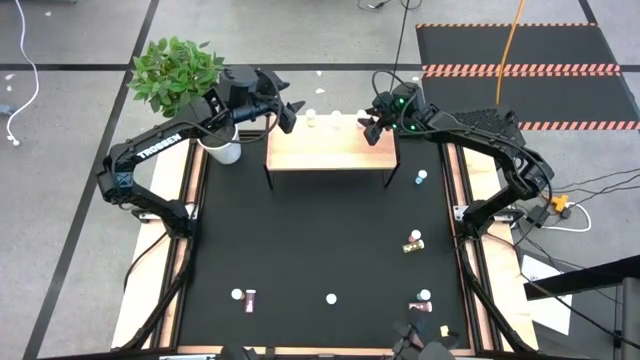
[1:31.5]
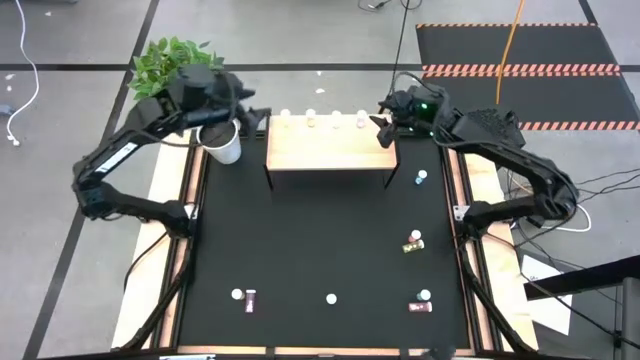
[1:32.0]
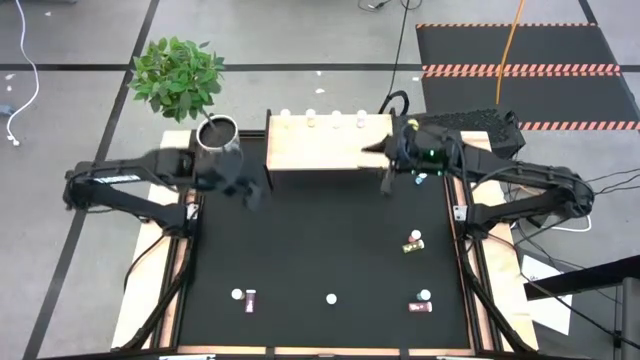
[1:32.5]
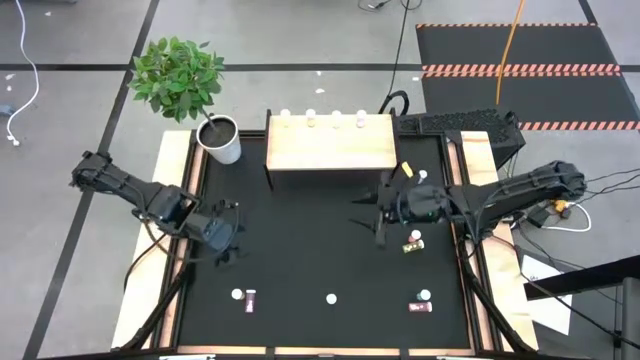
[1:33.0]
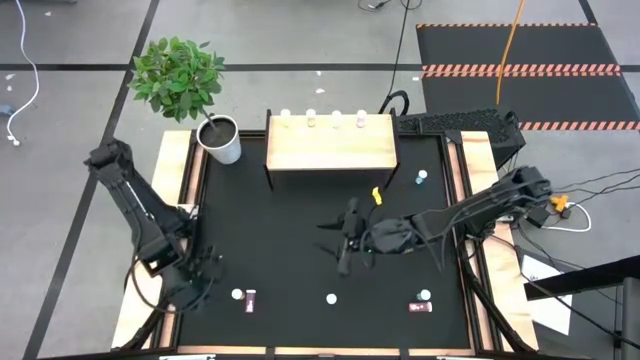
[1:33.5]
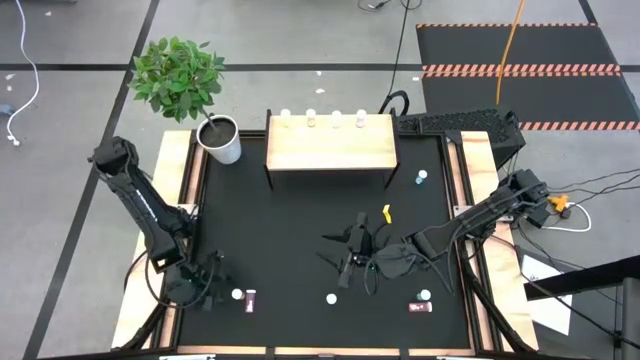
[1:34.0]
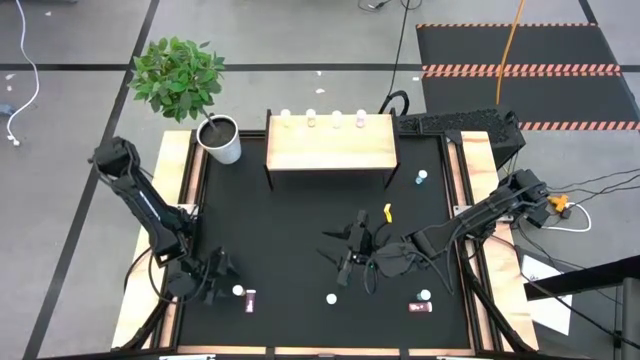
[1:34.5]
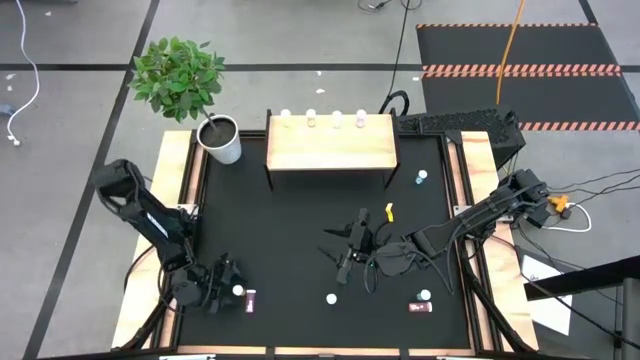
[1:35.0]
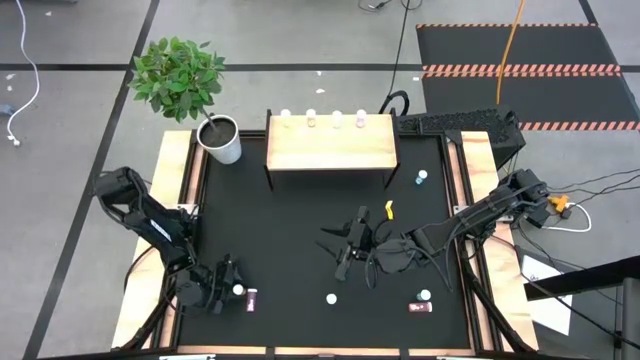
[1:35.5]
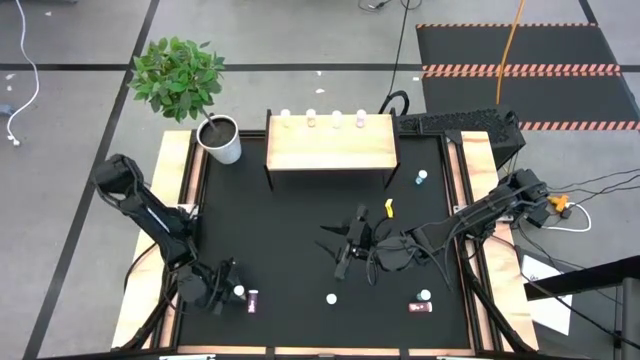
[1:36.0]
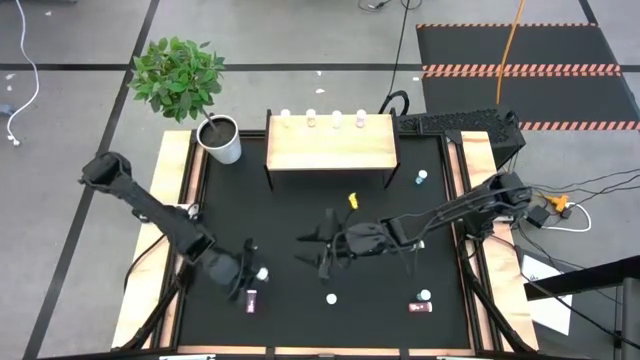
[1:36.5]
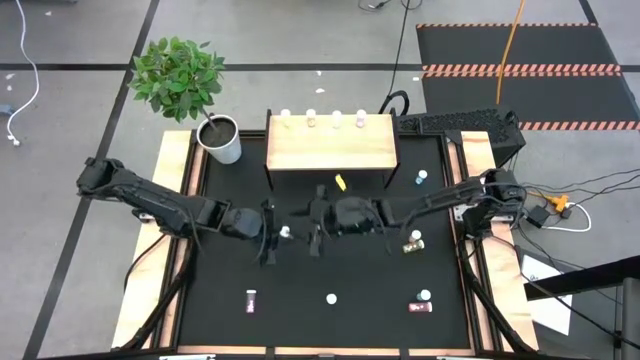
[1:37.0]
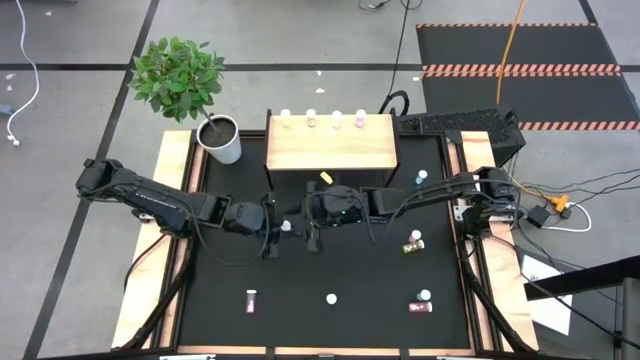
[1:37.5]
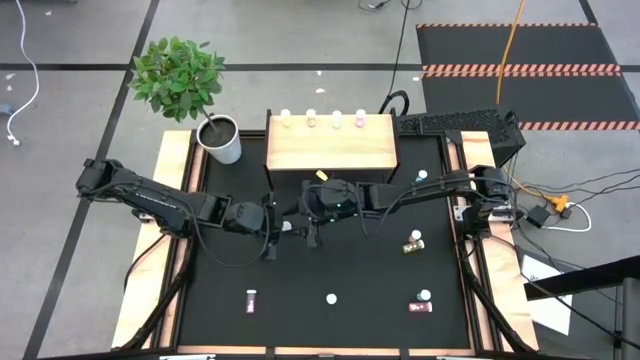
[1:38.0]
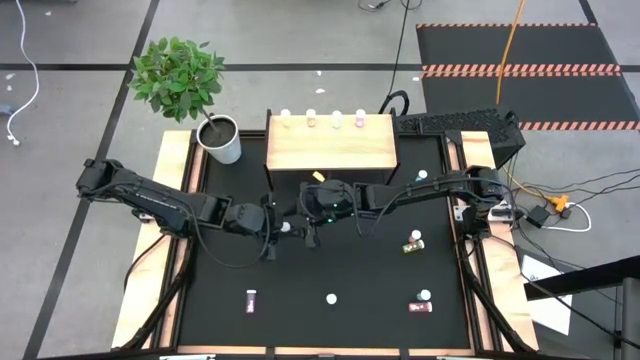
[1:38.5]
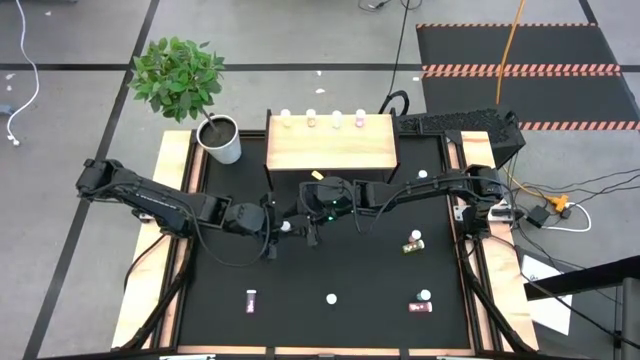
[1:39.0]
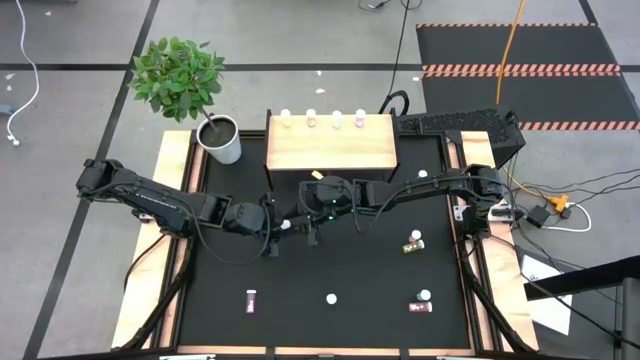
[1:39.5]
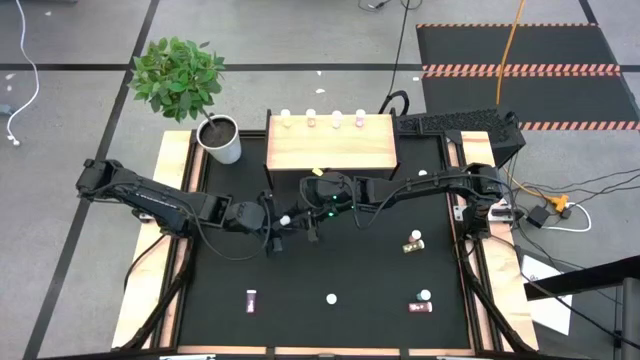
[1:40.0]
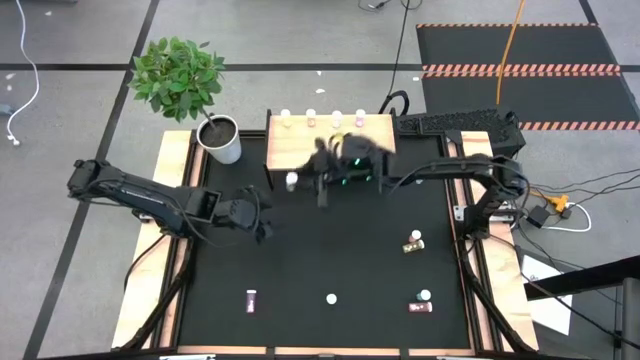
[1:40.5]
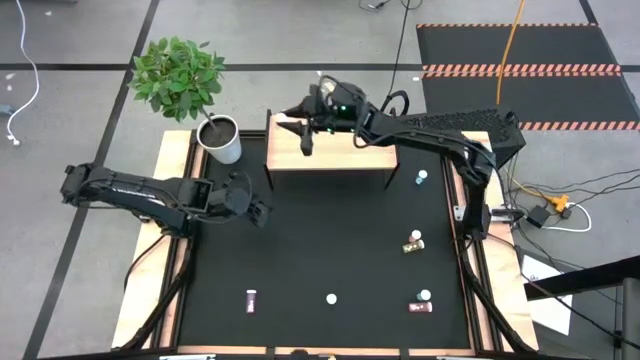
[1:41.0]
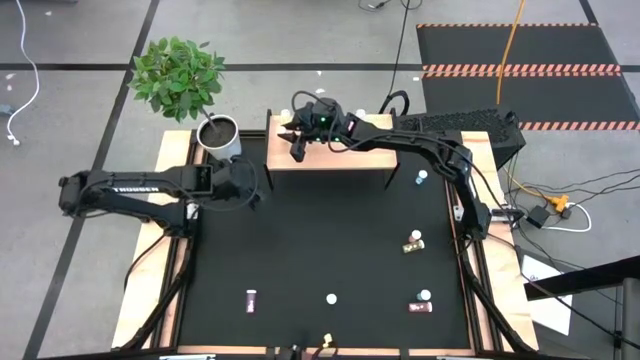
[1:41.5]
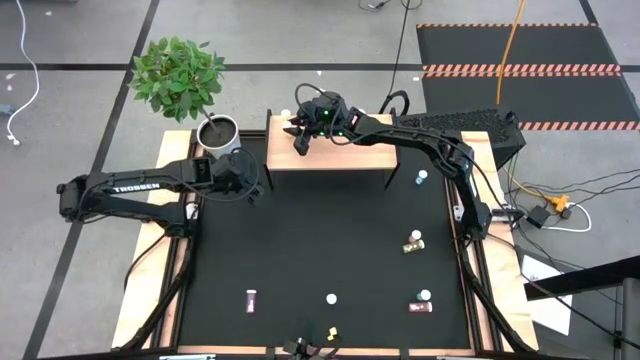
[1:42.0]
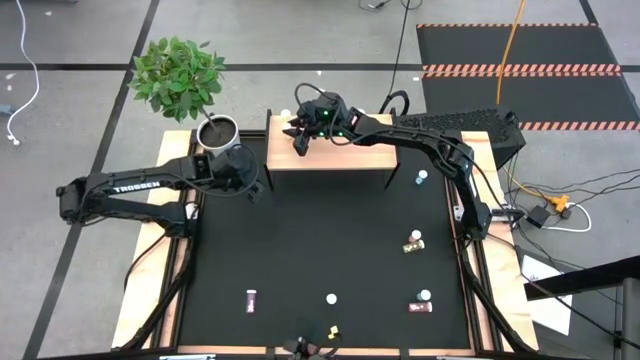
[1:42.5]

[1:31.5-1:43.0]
Task: Pick and place medicine bottles onto shelf by color
Put the bottom yellow pill bottle on the shelf aligned with the other yellow pill bottle

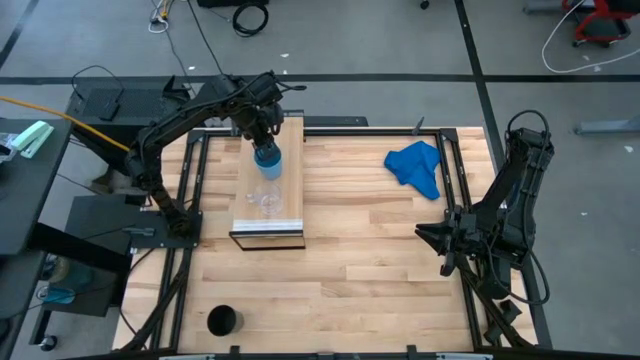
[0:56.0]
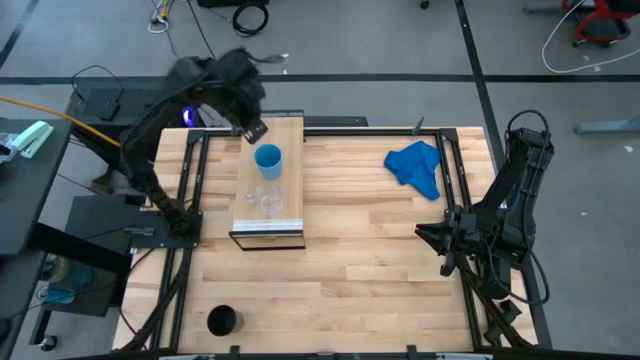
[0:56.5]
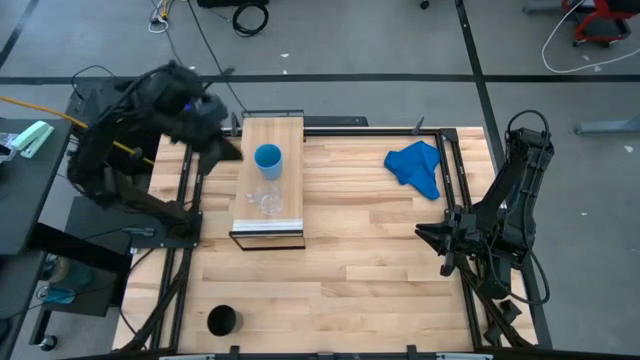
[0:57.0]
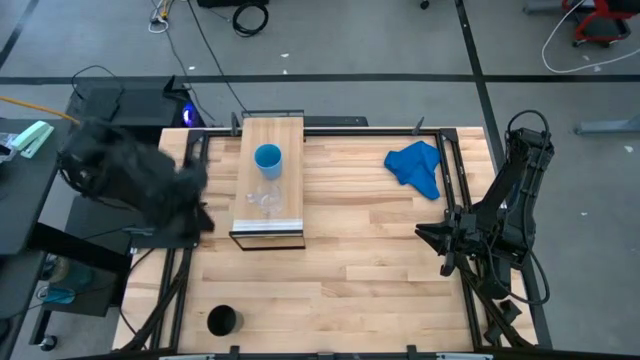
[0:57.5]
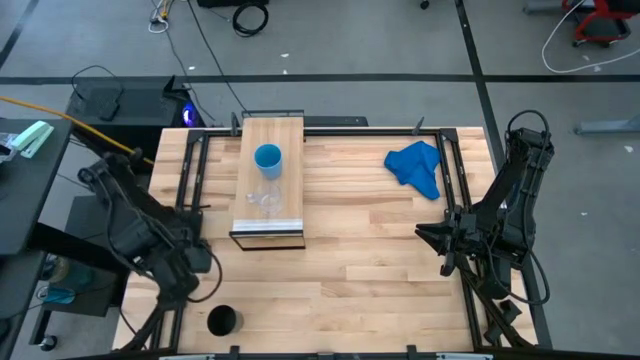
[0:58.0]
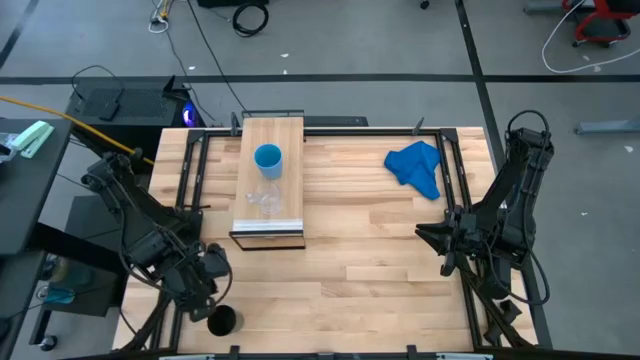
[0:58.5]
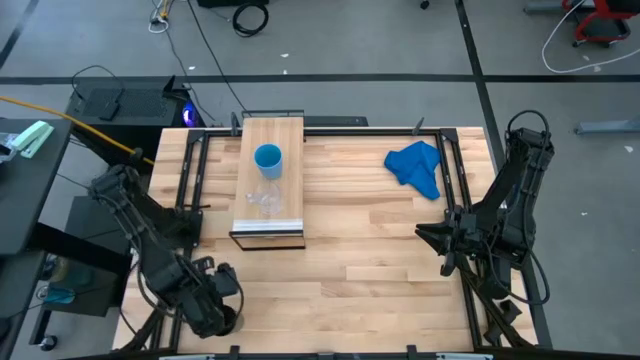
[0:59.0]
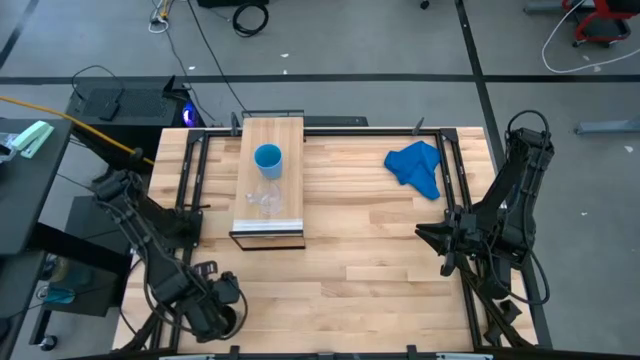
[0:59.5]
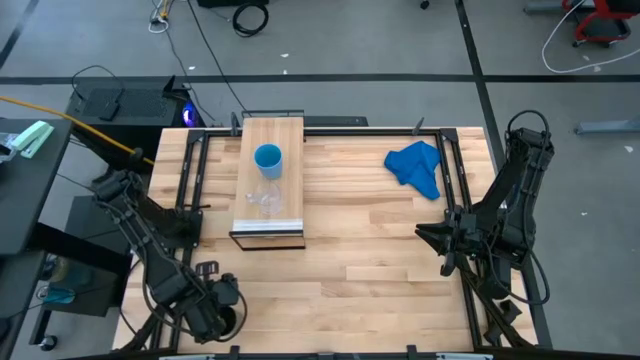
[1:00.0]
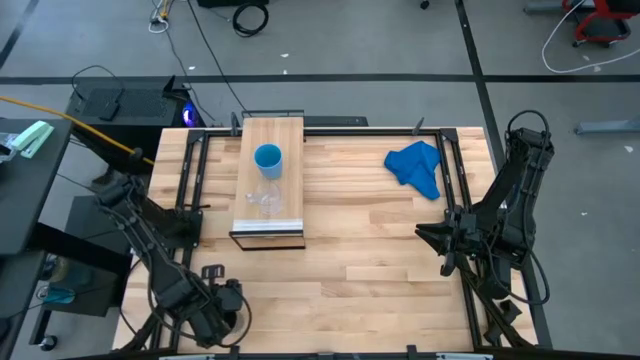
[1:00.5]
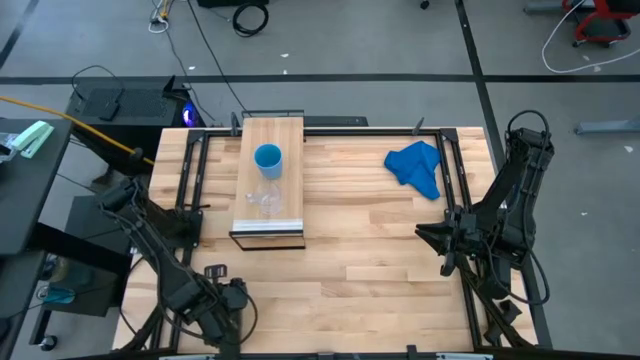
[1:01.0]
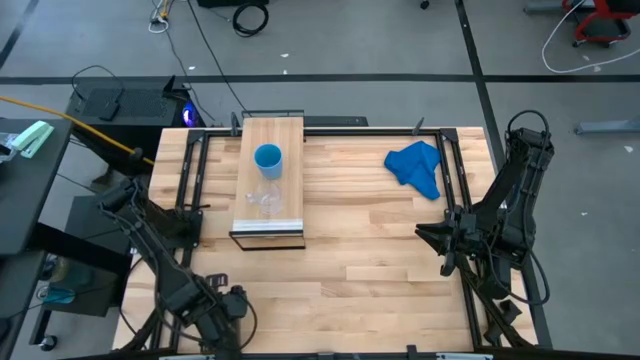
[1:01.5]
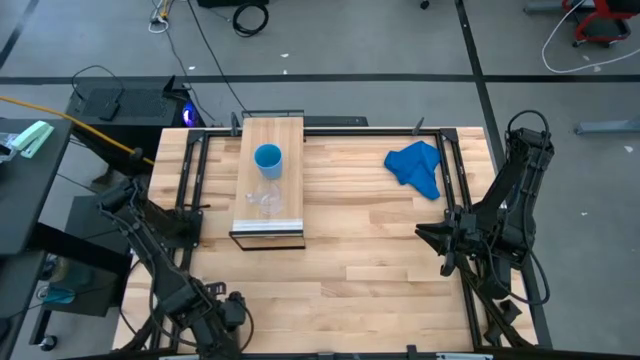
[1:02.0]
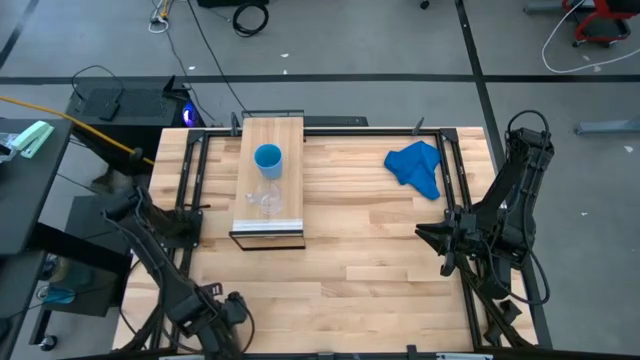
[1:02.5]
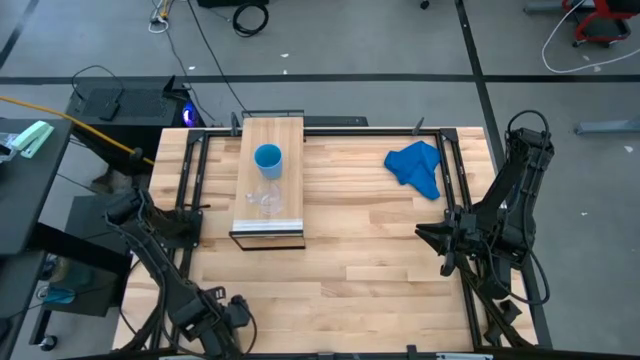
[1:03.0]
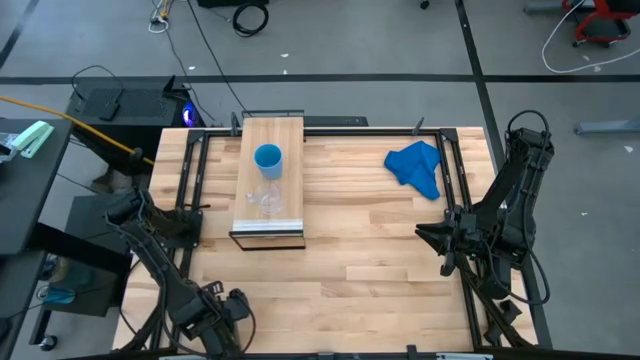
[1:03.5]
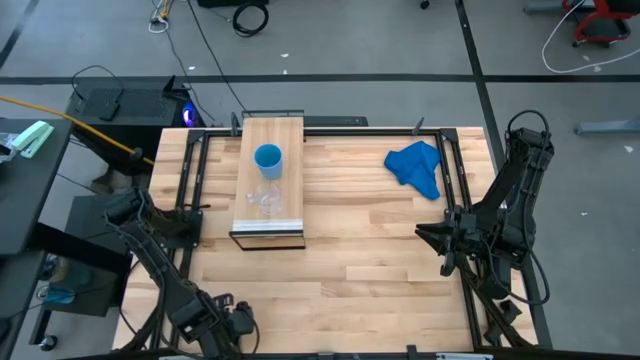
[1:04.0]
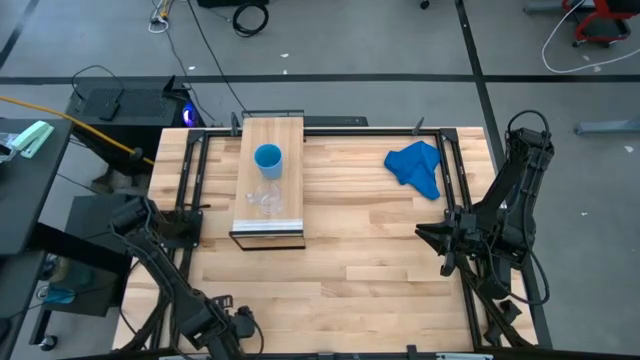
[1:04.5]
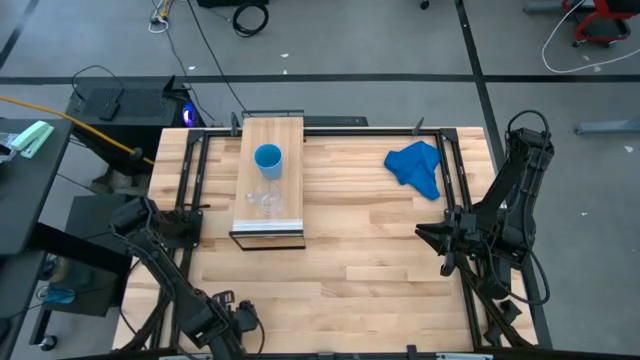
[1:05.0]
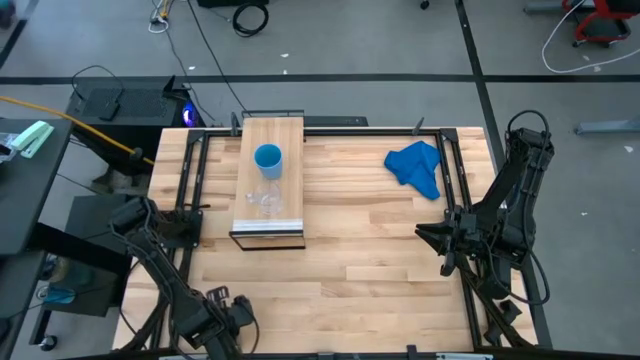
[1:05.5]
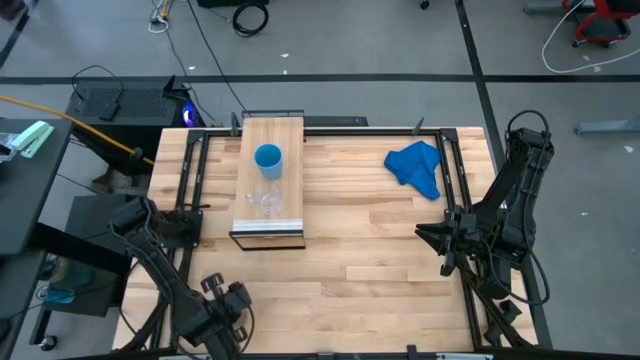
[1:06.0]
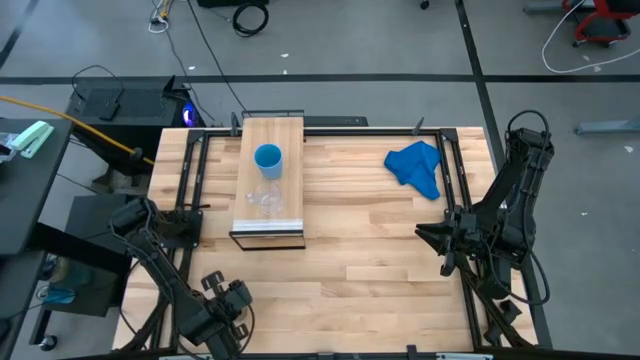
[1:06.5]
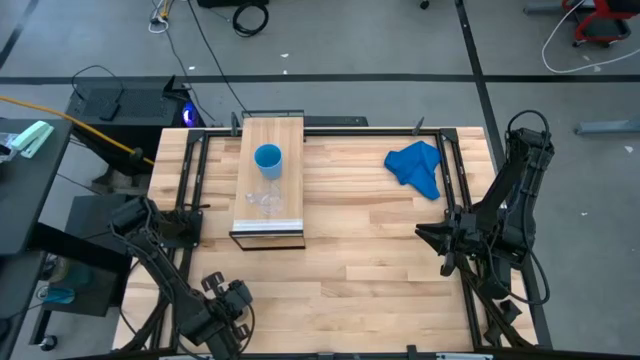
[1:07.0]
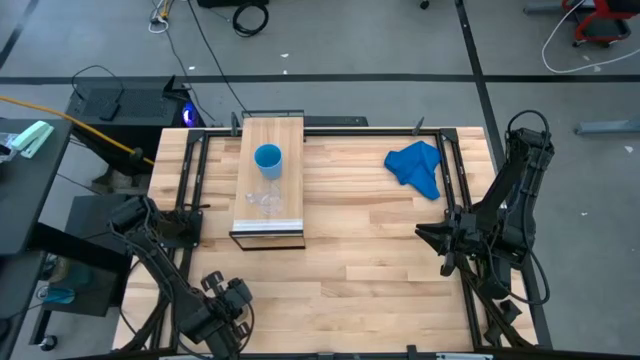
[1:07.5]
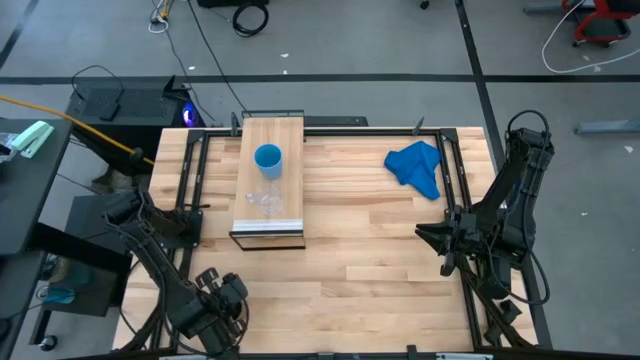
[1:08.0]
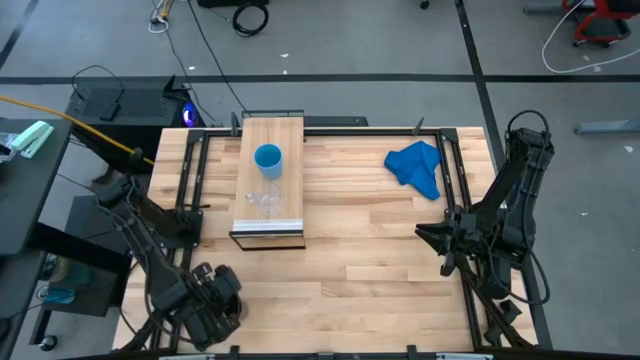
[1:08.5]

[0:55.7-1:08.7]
Task: Stack small to large cups/mugs on shelf
Put the black cup on the shelf
